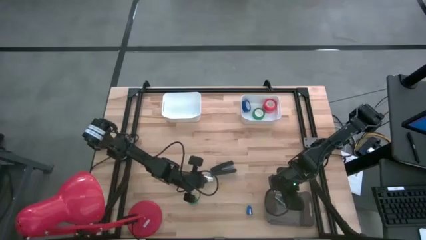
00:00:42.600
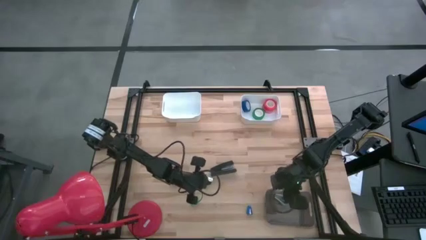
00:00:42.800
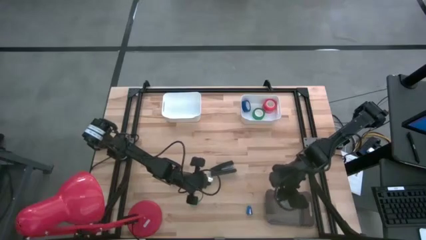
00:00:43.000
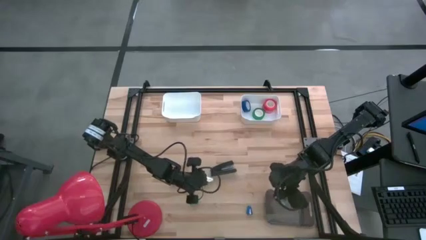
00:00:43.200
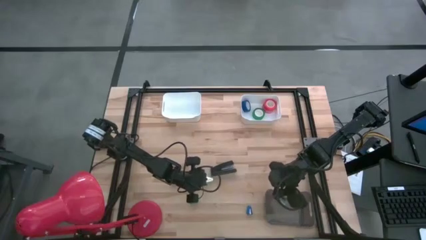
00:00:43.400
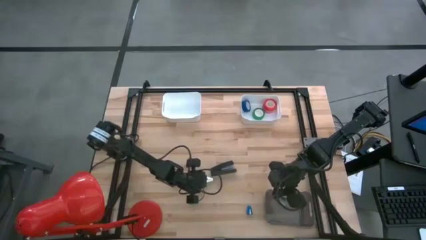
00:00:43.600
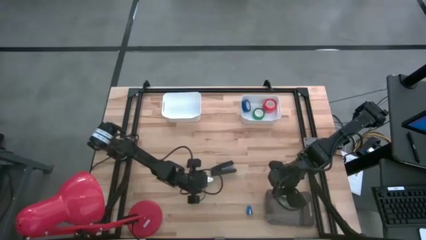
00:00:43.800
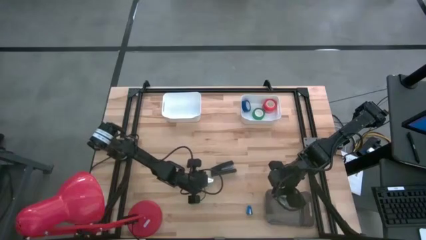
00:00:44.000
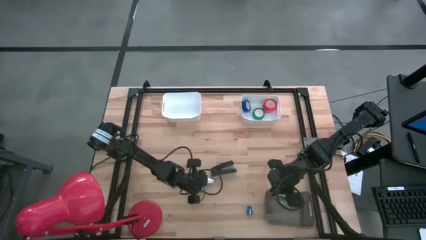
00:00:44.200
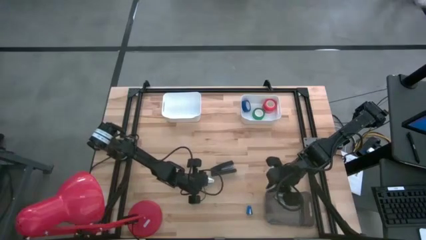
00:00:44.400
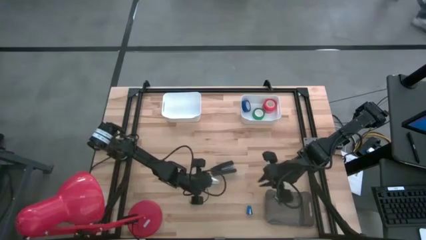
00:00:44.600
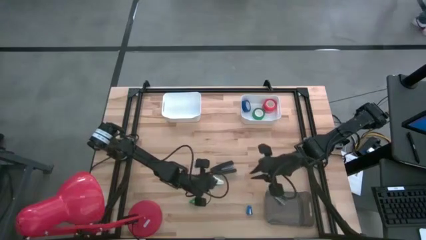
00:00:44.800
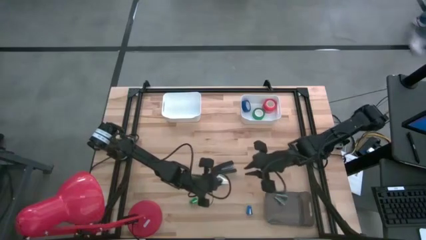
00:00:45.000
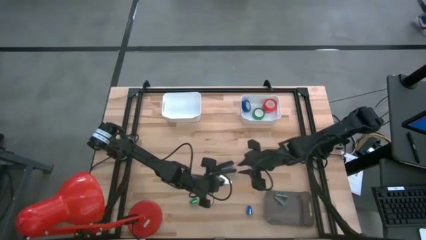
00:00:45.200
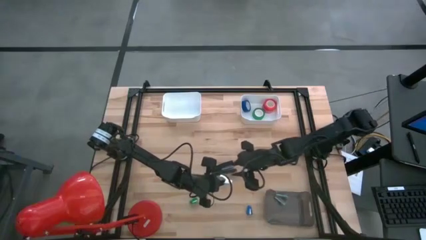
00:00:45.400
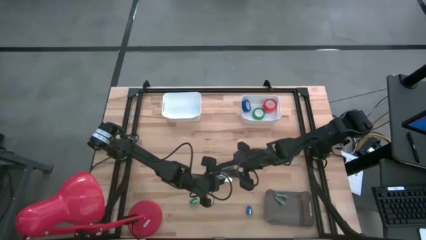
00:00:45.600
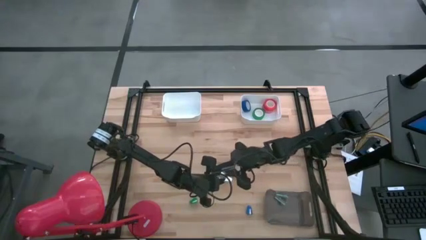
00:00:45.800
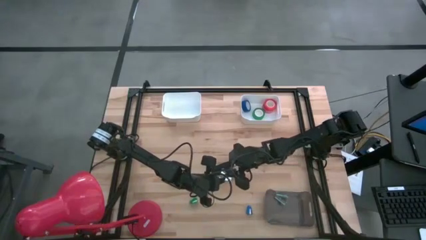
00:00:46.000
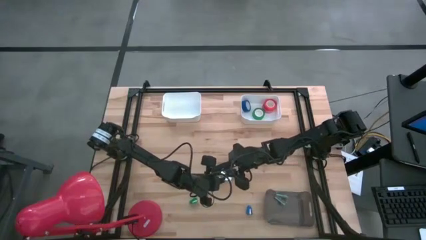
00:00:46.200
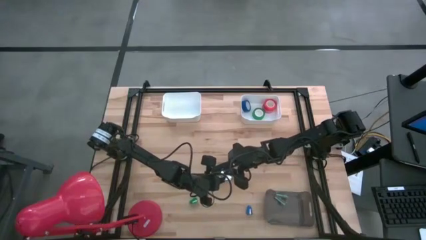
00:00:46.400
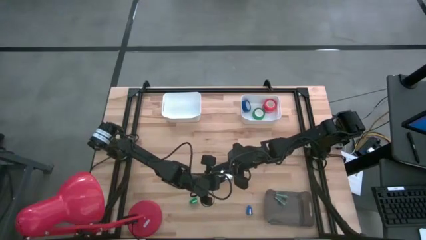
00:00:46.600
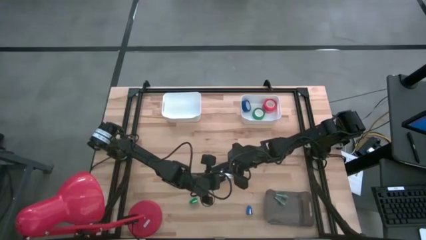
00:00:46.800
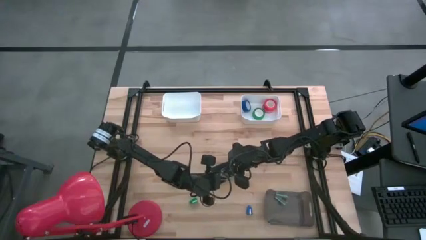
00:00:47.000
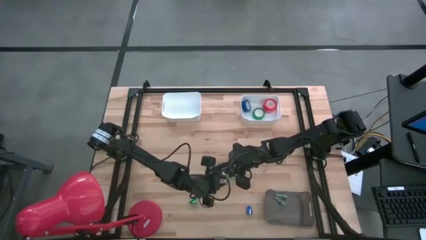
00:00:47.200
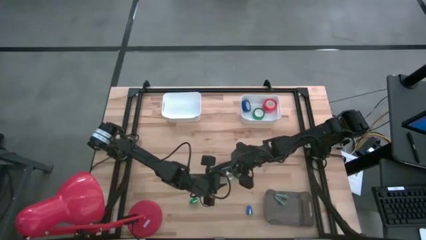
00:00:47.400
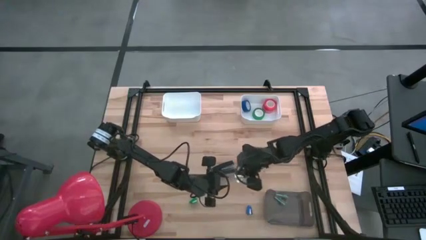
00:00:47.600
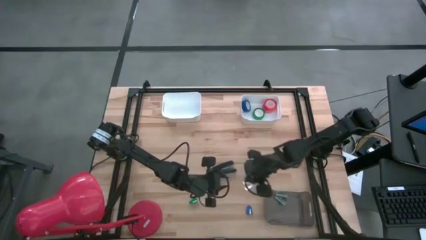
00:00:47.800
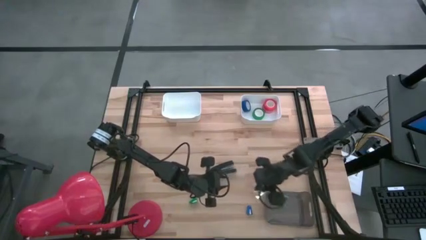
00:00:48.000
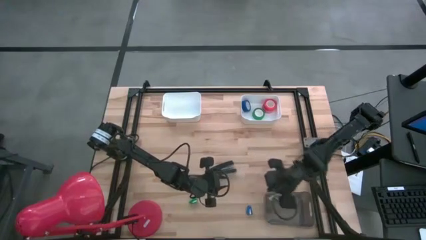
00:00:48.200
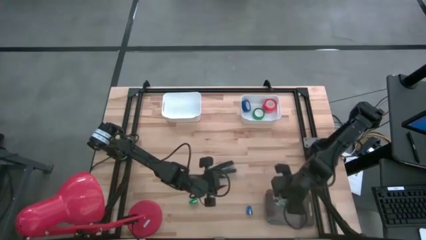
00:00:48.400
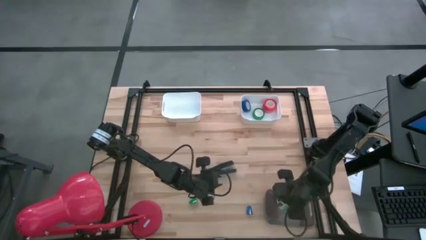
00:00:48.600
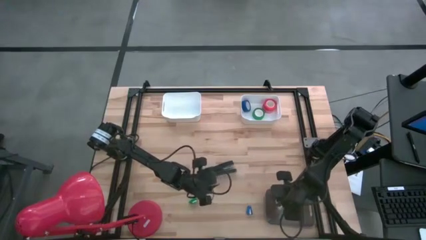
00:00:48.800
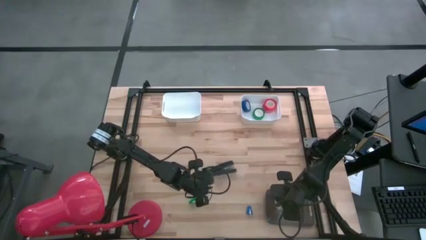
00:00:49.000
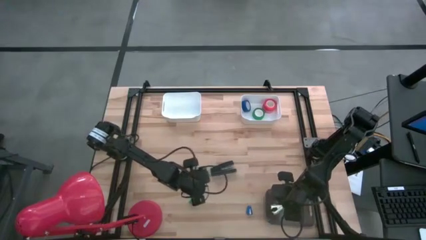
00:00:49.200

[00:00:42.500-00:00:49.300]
Task: Pick and place Stapler, Stapler remover, tape
Put the light blue staple remover into the gray bin

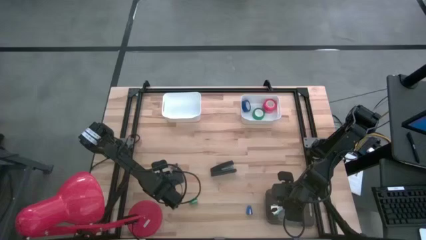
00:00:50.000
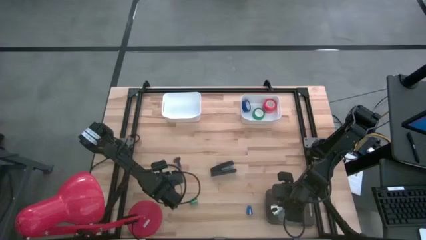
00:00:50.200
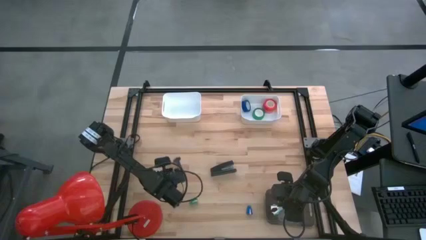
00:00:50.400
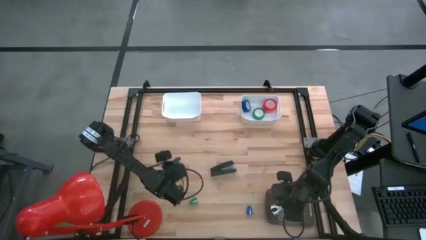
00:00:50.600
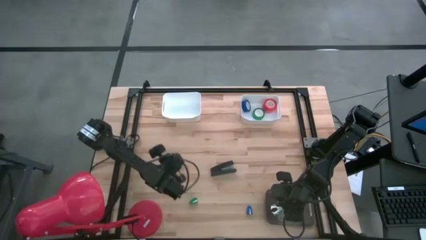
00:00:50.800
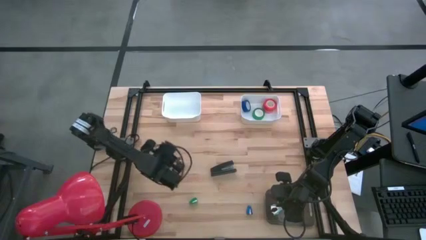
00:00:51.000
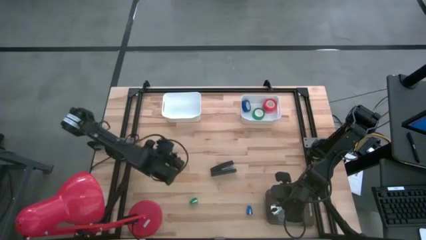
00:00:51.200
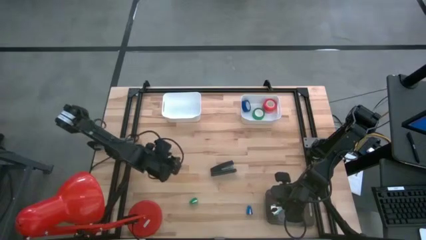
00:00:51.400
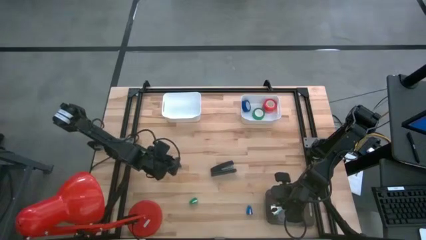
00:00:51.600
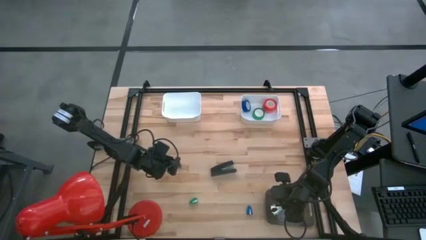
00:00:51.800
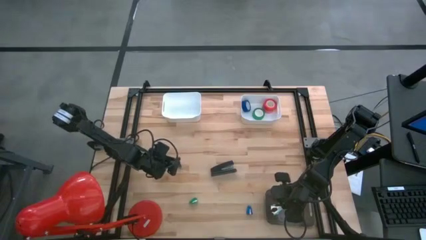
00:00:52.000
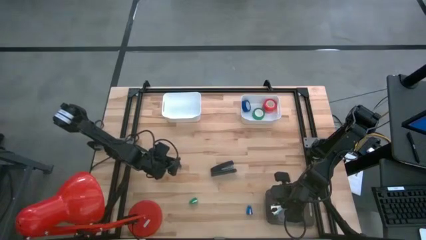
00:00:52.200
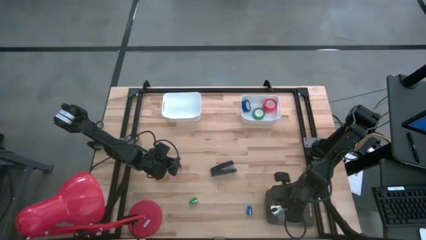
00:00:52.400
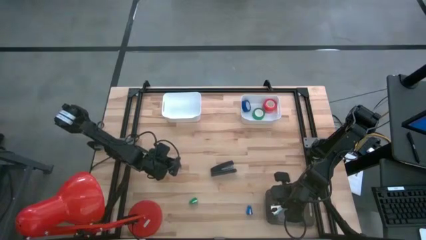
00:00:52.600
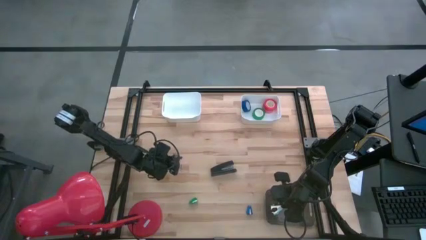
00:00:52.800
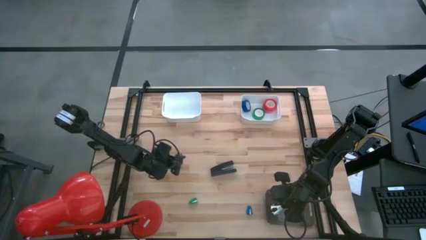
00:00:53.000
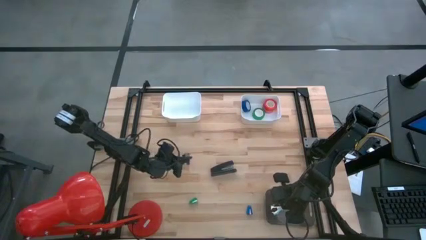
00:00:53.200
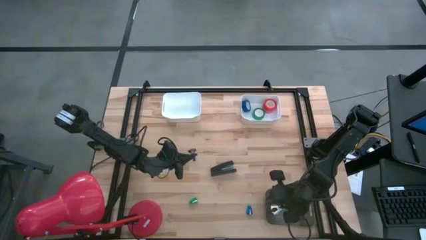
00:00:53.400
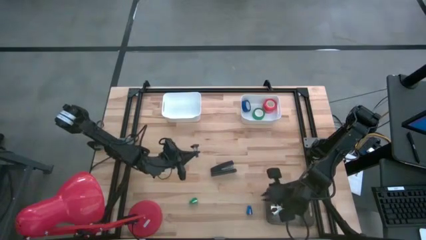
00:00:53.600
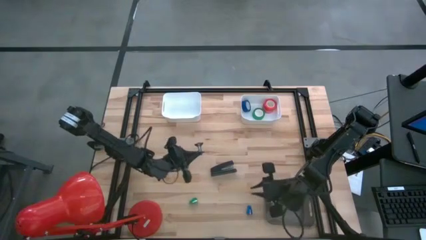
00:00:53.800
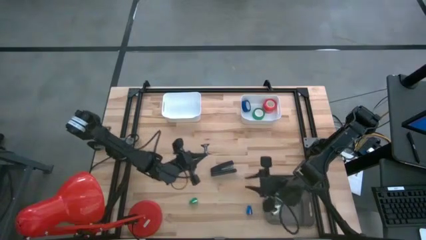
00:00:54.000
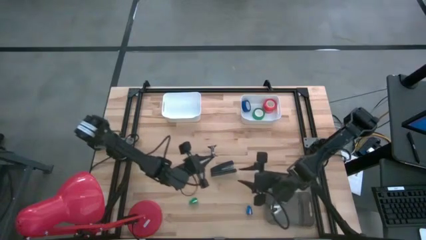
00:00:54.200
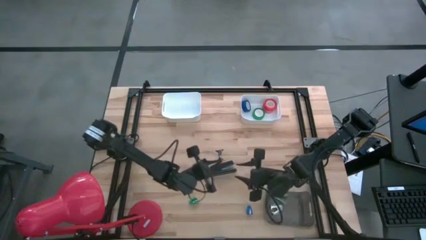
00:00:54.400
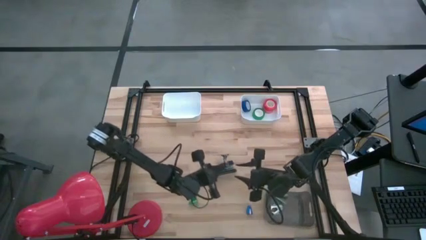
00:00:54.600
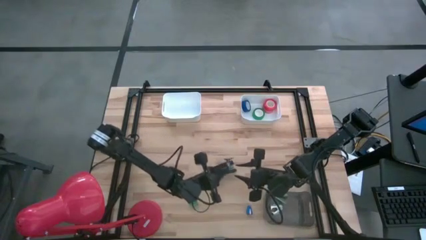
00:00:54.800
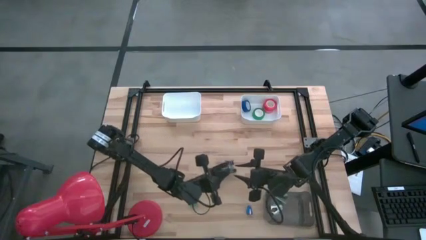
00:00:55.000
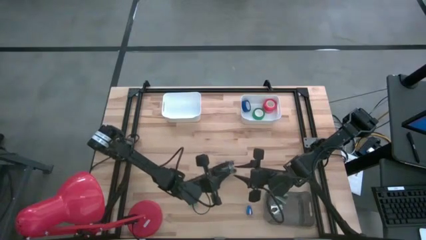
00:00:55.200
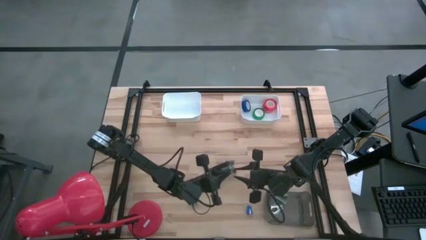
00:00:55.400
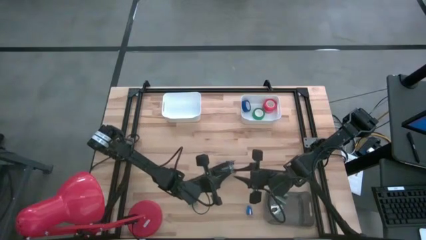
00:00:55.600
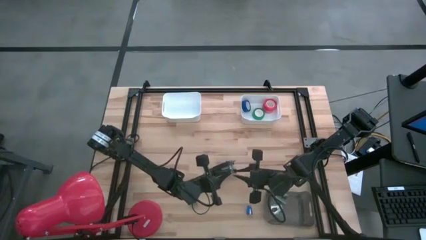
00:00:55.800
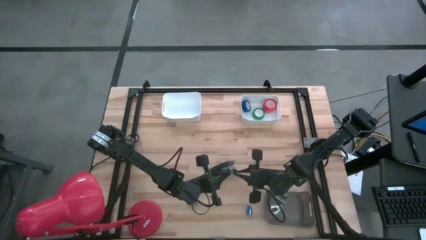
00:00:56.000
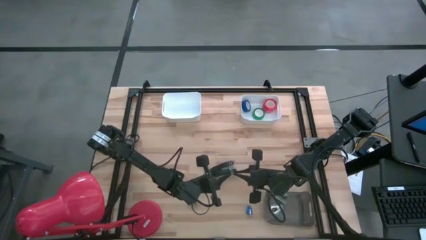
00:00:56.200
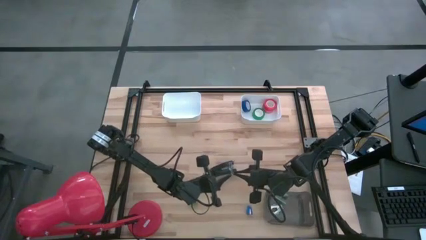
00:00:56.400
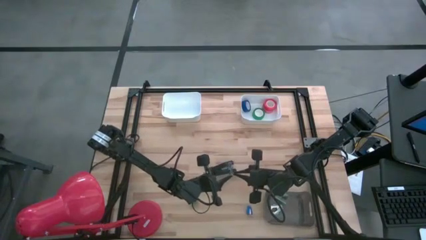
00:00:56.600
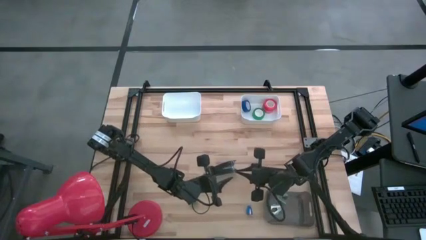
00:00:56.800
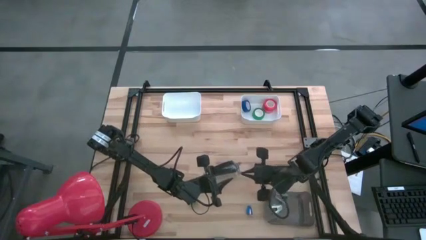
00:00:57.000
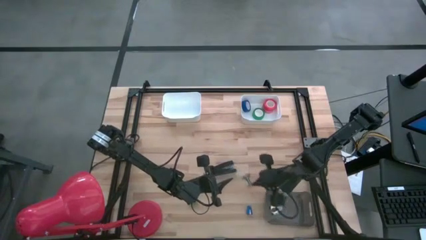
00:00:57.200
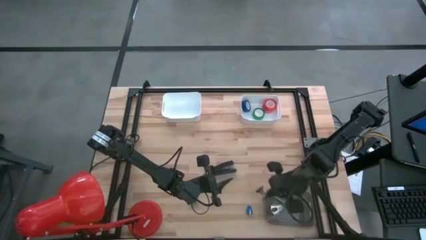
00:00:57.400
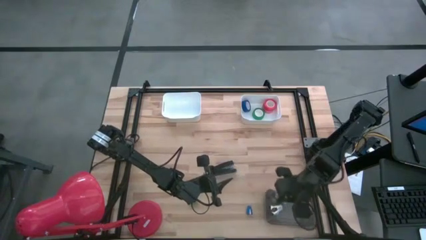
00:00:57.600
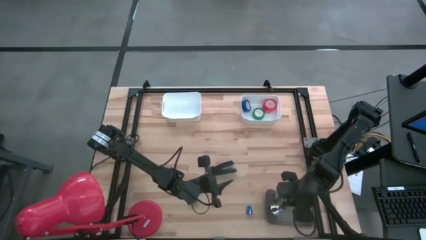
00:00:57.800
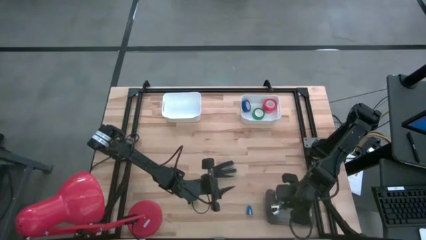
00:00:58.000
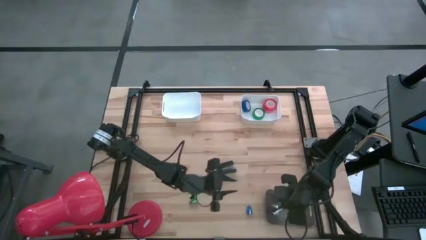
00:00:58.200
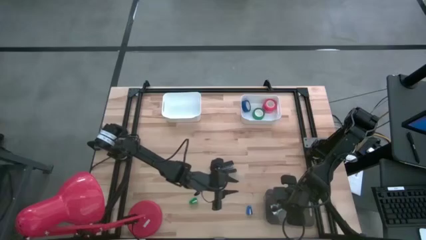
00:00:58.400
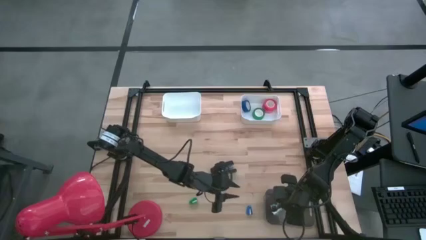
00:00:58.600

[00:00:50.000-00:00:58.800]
Put the black staple remover into the gray bin

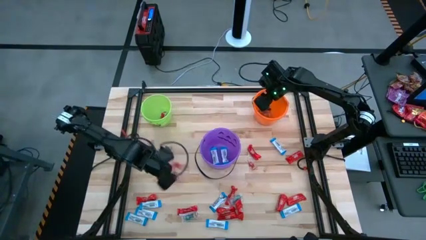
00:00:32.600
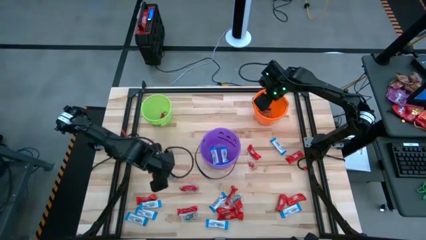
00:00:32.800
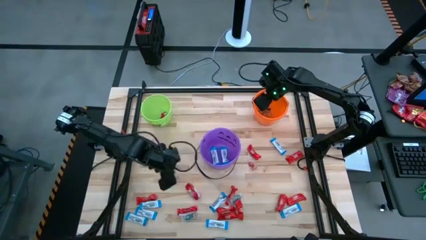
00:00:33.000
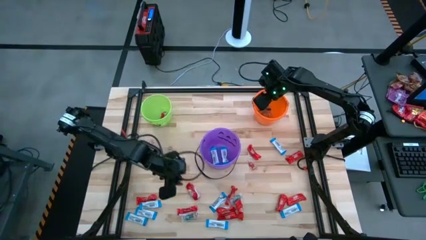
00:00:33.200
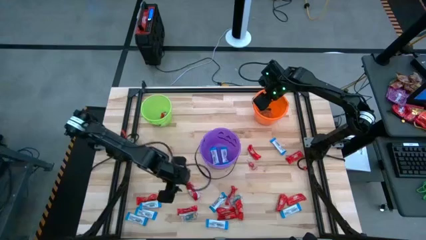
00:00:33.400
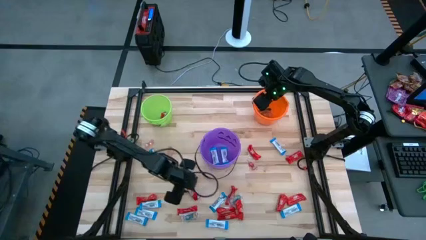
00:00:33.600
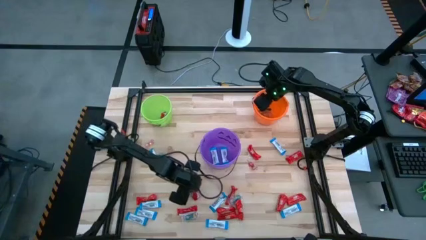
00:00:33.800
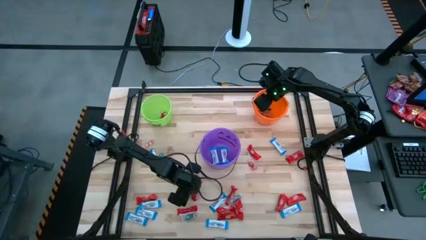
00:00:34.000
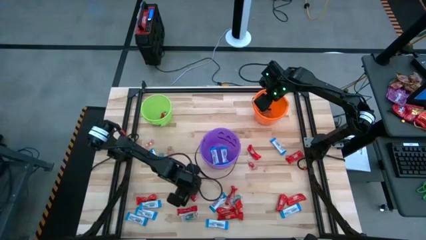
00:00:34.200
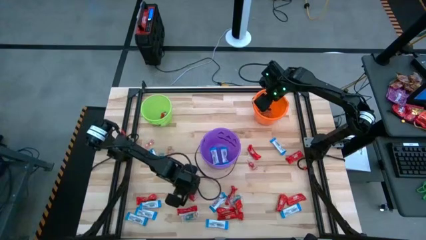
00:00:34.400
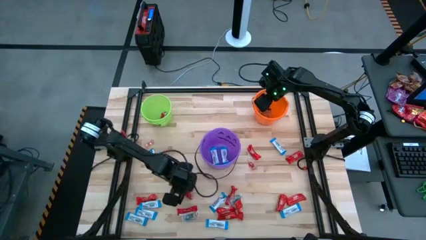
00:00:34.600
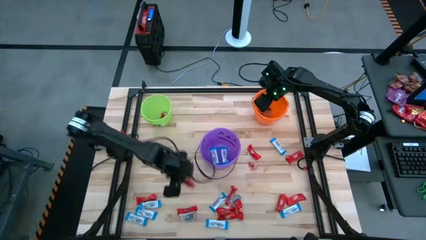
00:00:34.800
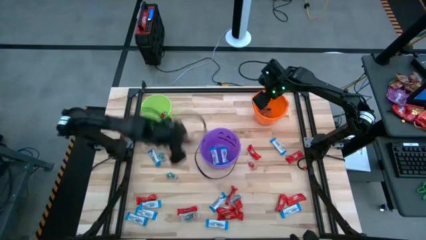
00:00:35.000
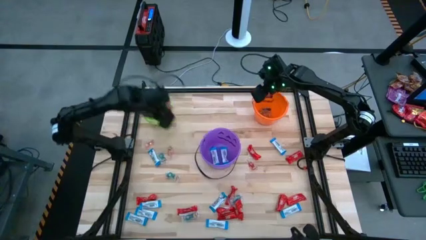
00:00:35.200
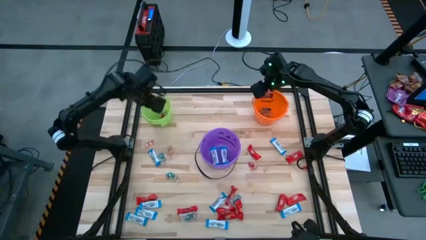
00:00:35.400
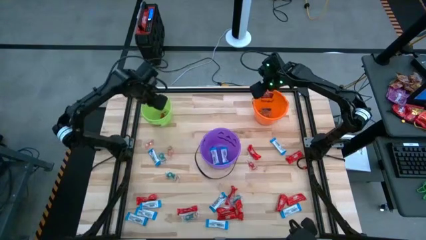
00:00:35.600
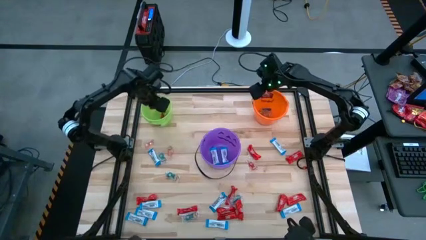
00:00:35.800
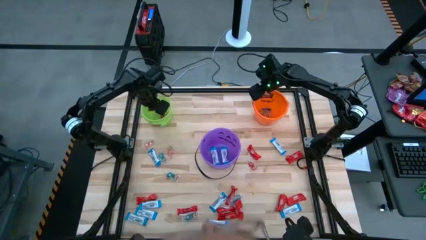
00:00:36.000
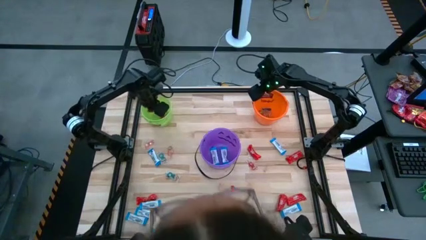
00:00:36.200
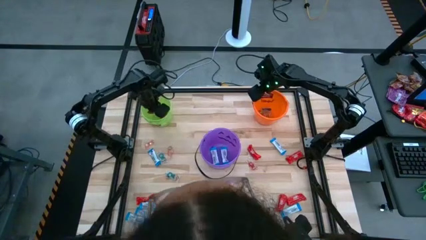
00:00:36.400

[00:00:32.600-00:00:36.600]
Task: Sort candy by brand, put in halloween buckets
Put the red chocolate into the green bucket
